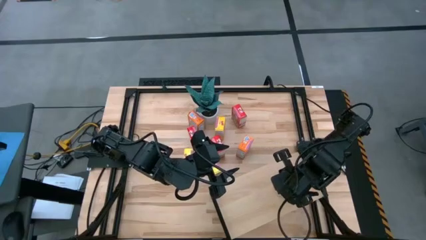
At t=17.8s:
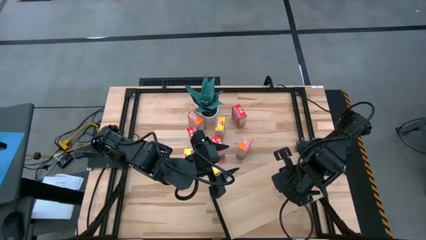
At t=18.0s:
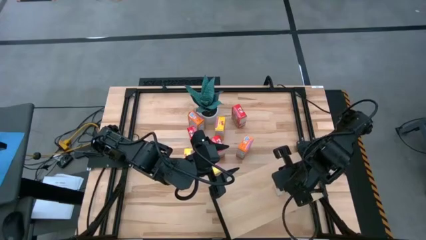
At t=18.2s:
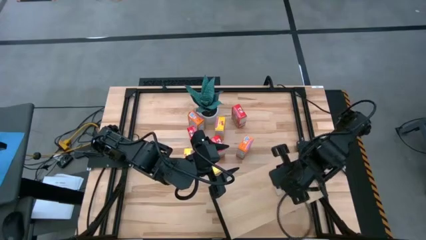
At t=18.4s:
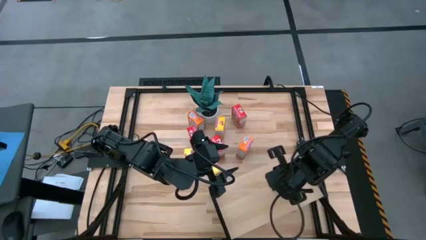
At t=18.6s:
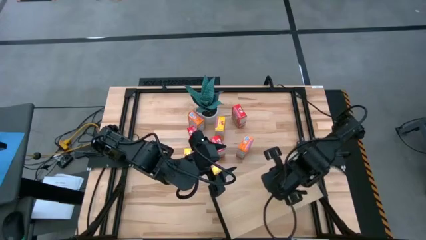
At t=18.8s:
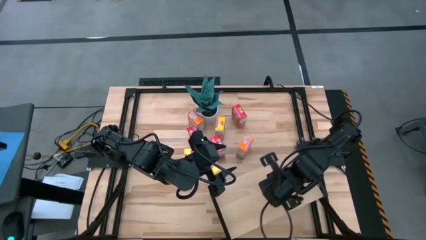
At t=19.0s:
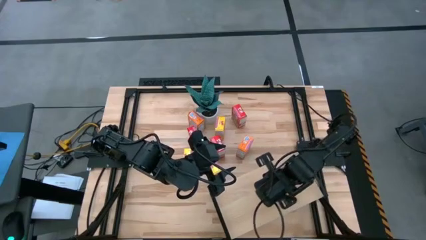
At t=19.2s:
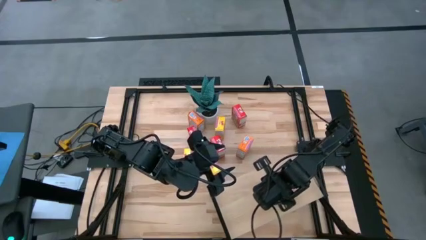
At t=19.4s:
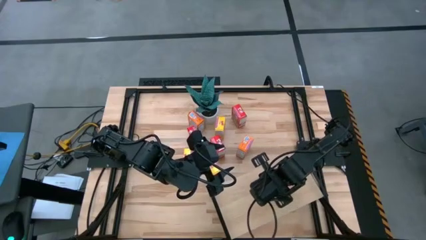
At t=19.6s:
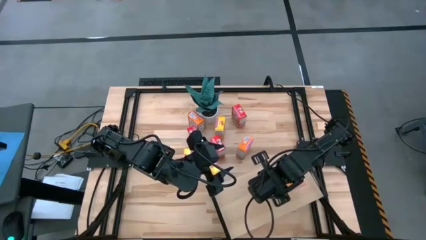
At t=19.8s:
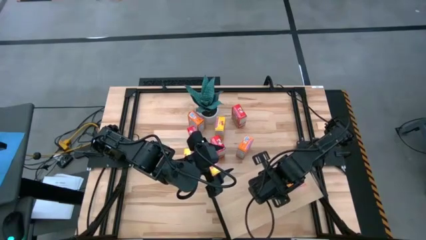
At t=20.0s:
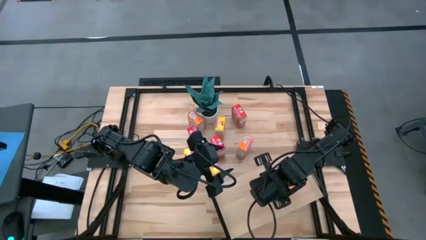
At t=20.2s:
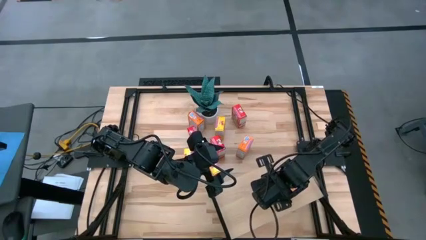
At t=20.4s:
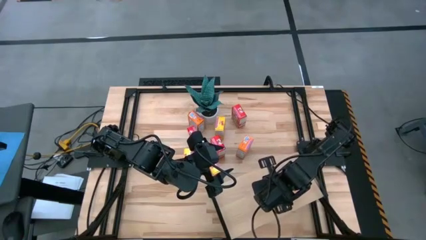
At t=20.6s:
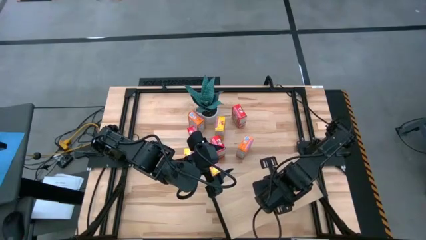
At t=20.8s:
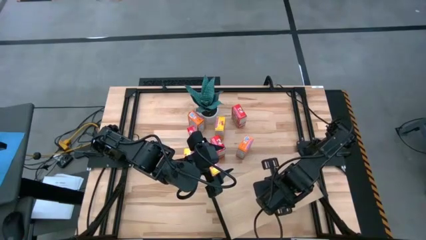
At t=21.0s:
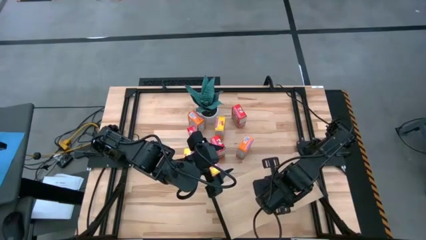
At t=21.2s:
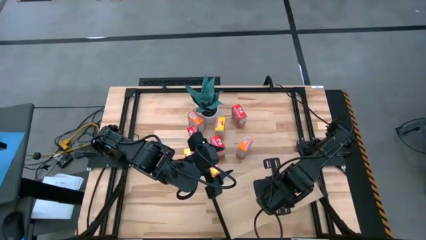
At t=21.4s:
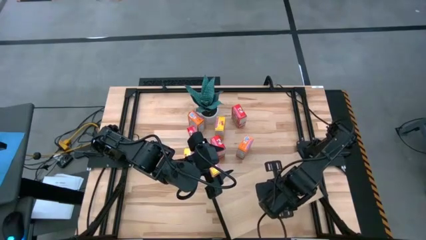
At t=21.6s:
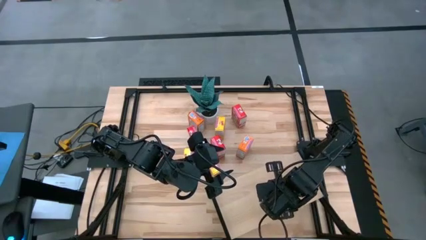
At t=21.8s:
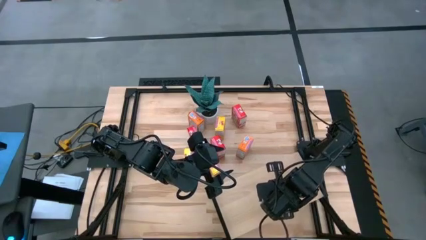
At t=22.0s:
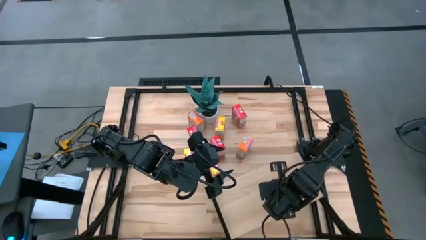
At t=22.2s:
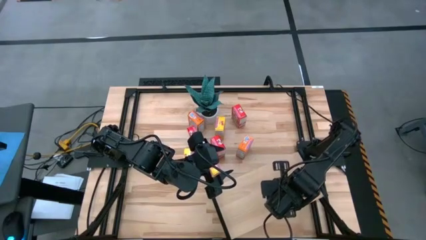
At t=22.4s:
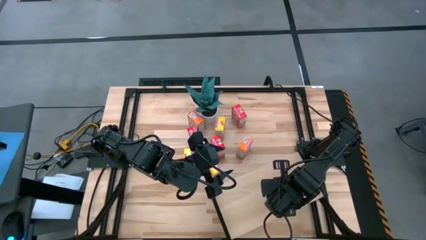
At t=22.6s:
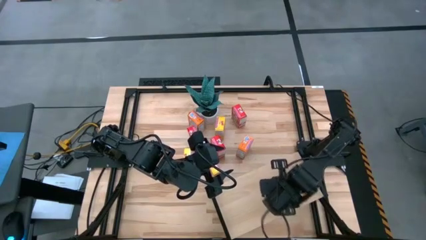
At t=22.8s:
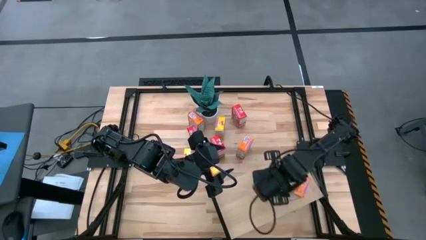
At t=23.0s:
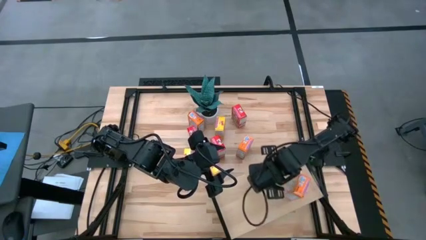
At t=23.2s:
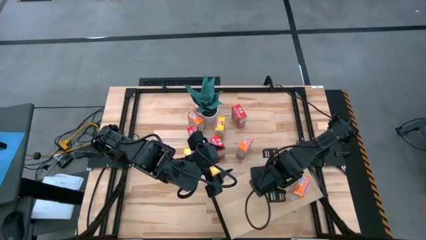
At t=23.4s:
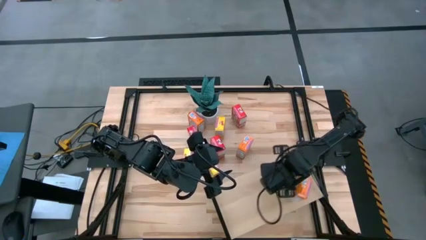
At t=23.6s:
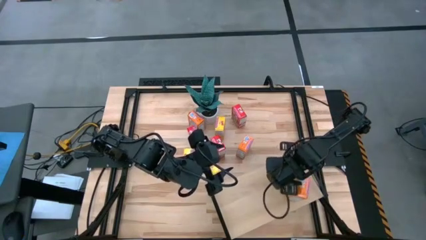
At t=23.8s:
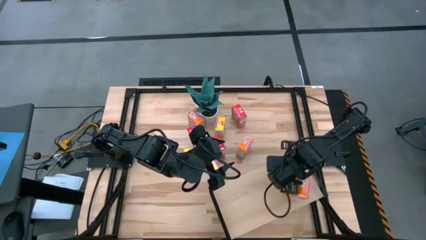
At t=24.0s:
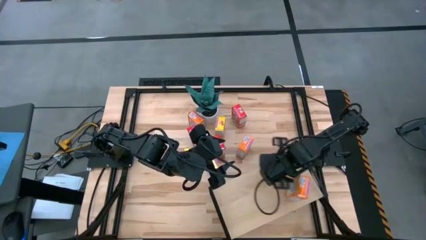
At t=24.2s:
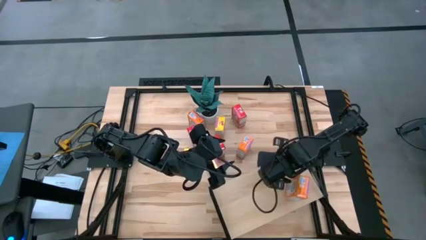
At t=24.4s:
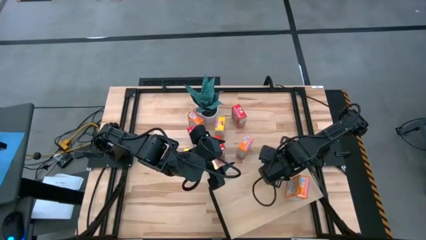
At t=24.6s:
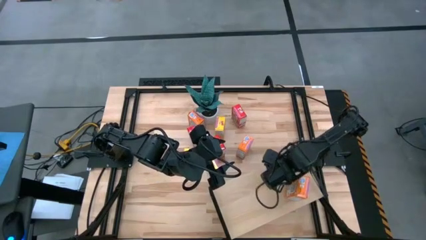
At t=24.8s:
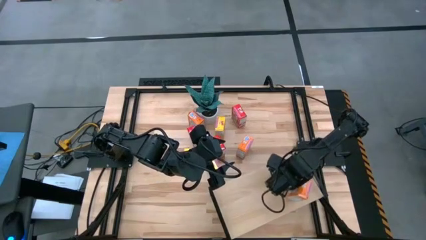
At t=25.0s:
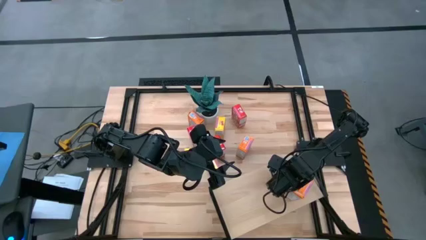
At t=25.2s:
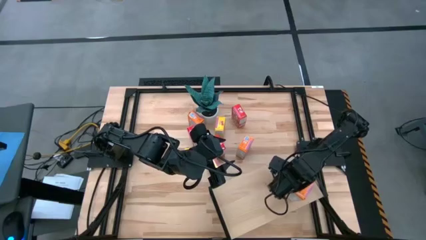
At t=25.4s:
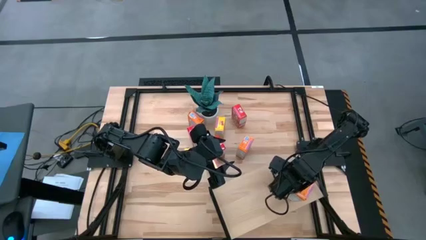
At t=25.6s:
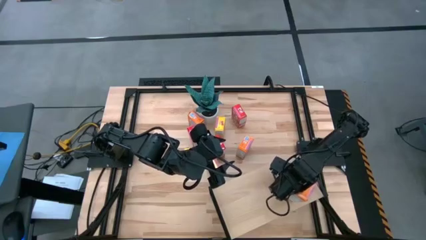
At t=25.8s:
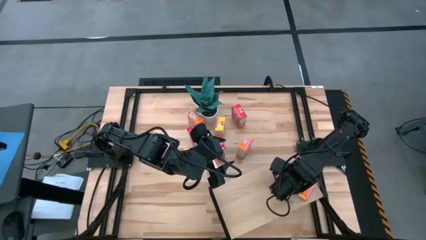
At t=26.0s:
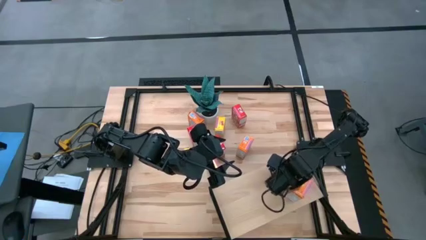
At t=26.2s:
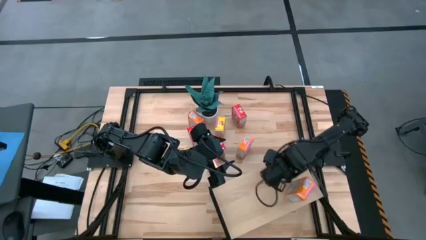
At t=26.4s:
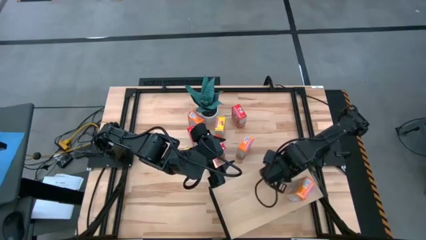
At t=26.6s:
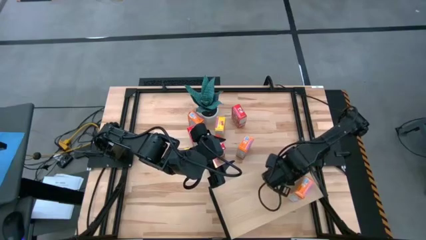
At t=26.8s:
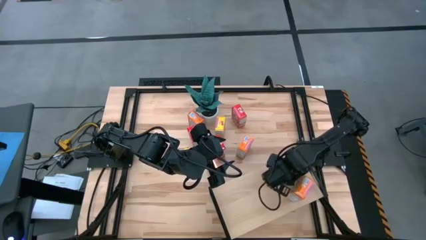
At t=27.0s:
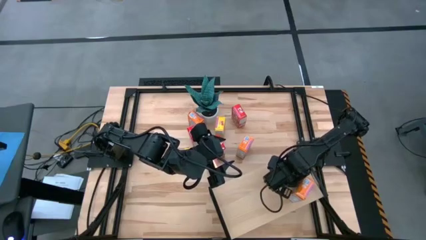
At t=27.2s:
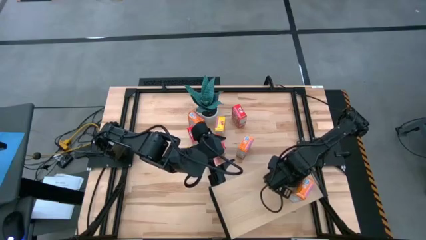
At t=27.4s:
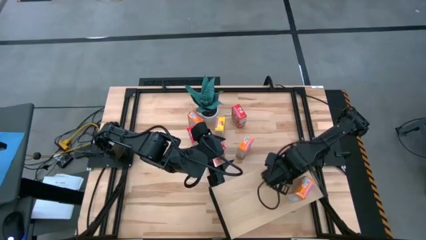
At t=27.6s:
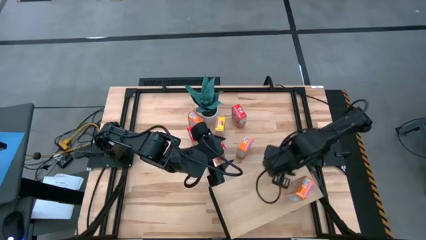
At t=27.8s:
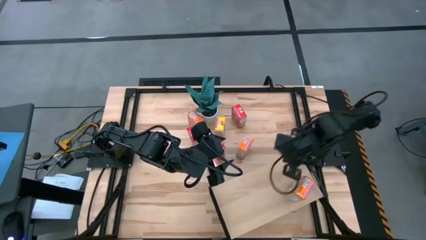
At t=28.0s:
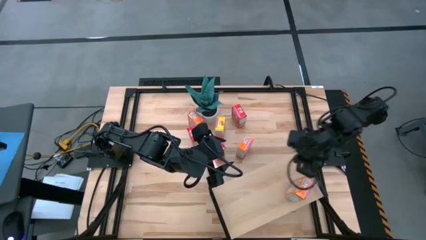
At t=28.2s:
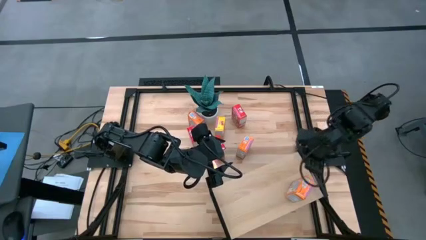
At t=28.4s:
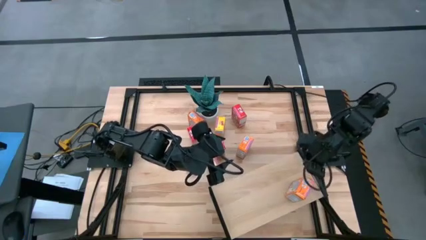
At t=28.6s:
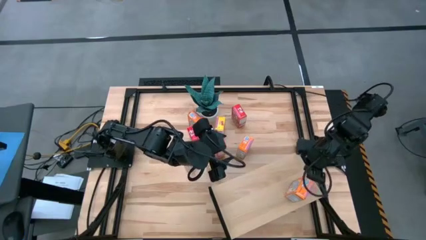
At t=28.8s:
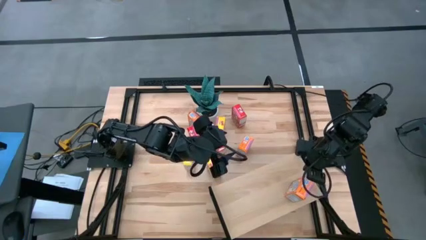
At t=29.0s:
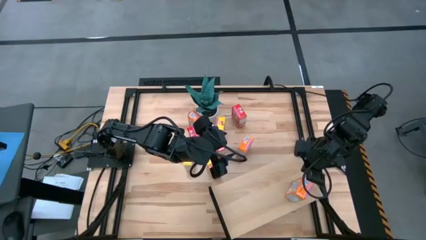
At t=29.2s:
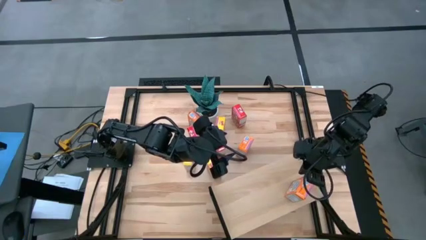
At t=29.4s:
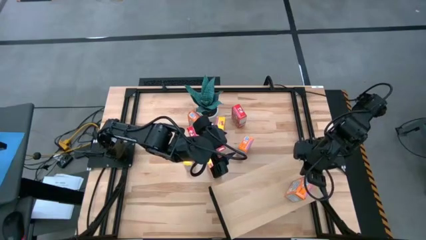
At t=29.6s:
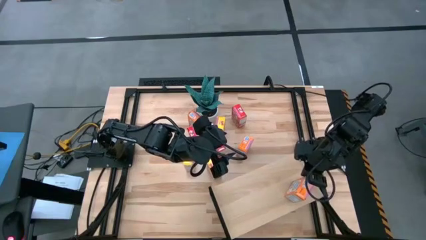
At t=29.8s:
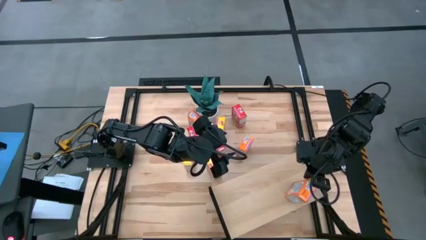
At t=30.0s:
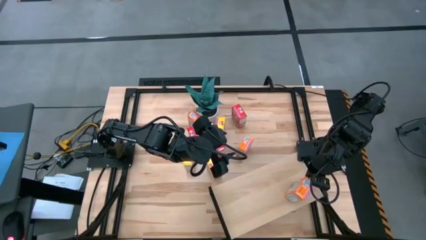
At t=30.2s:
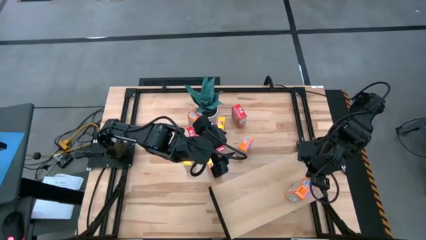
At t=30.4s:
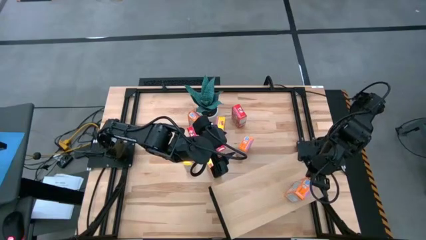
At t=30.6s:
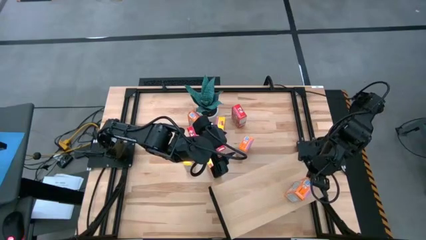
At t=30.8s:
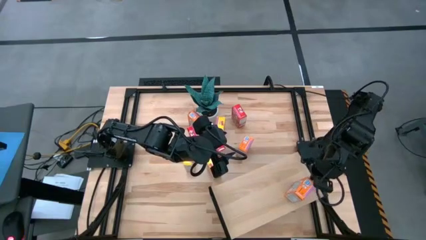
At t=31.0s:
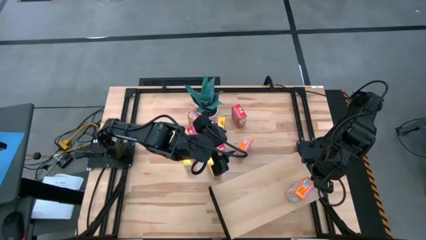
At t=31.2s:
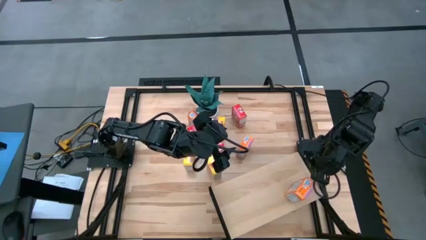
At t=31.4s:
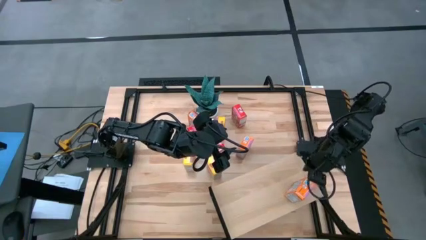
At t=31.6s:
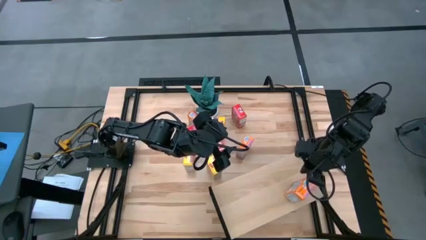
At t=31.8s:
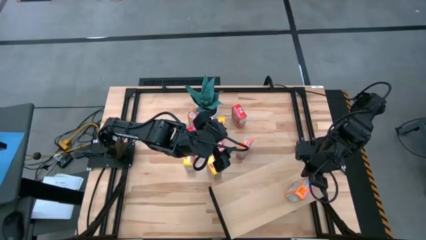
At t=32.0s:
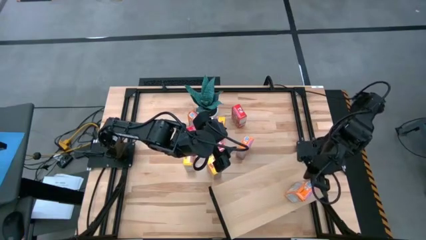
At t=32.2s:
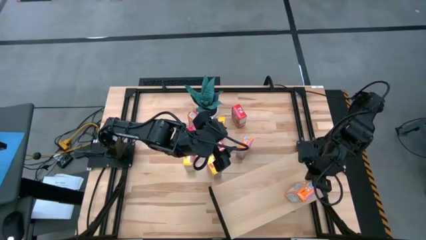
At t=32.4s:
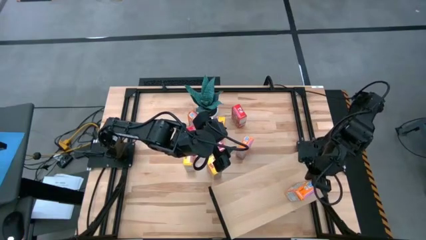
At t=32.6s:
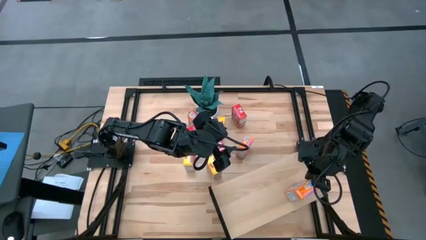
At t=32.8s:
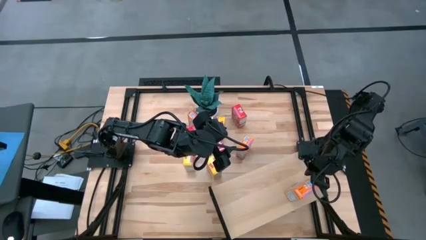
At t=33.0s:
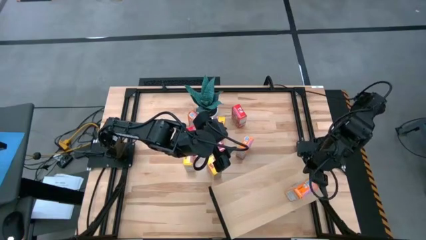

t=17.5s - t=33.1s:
Task: Stack cereal on shelf
Put the top right orange cereal box on the shelf
